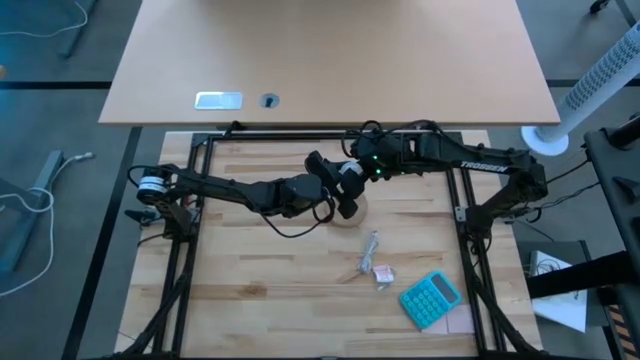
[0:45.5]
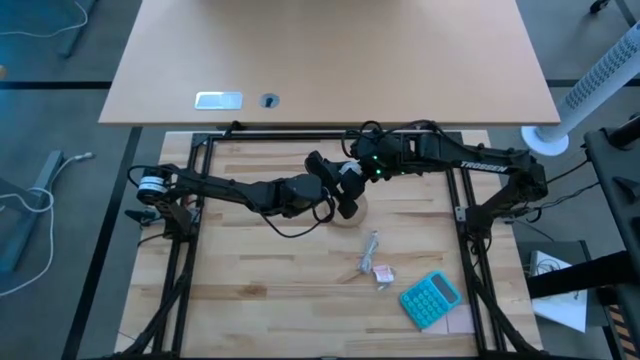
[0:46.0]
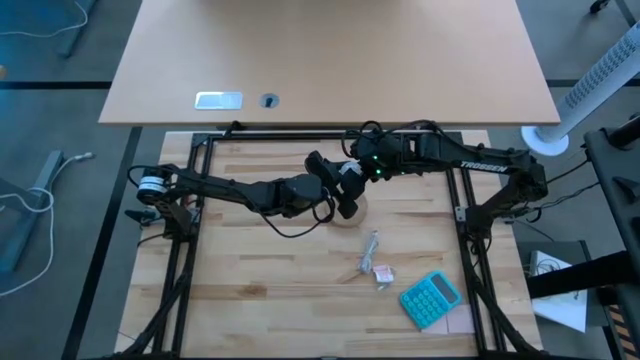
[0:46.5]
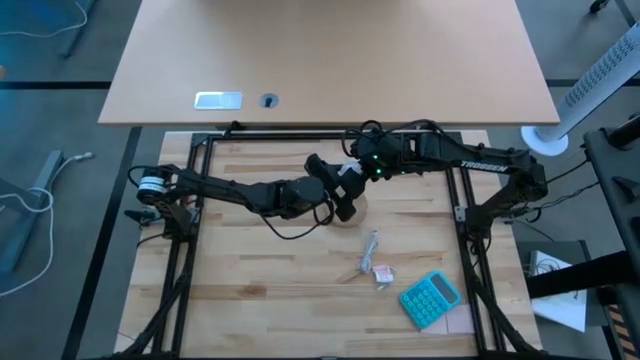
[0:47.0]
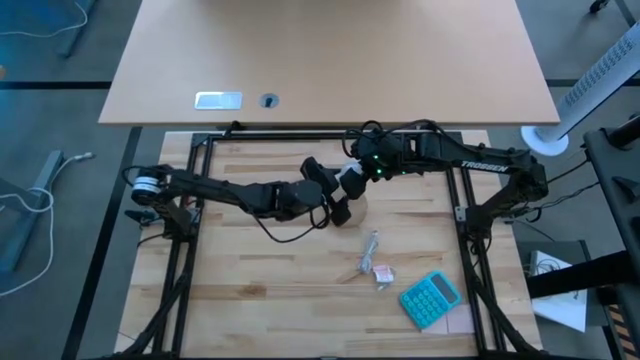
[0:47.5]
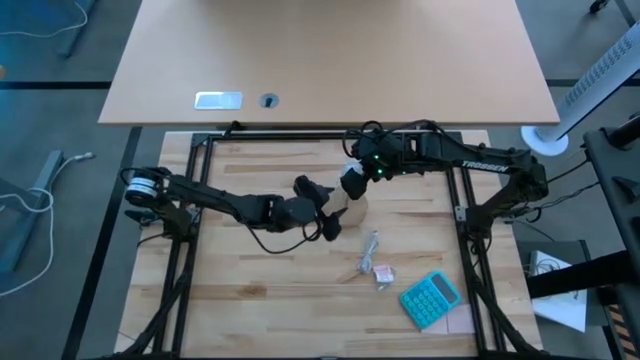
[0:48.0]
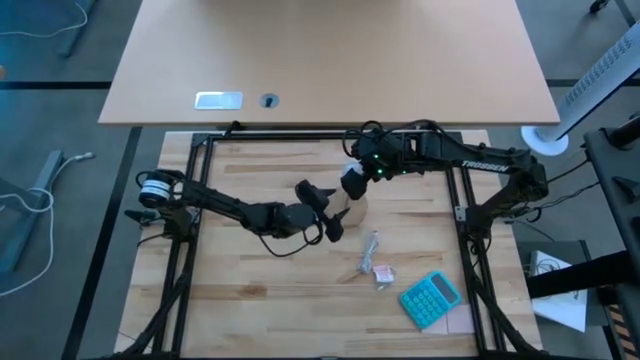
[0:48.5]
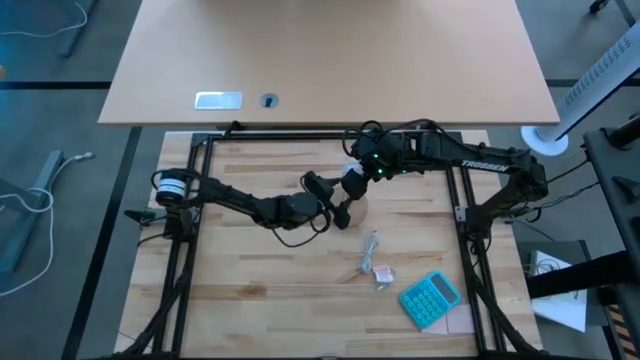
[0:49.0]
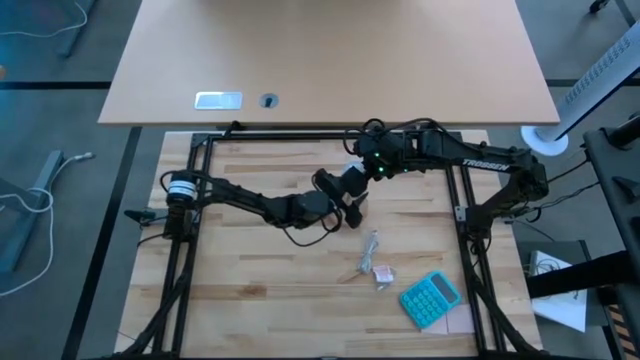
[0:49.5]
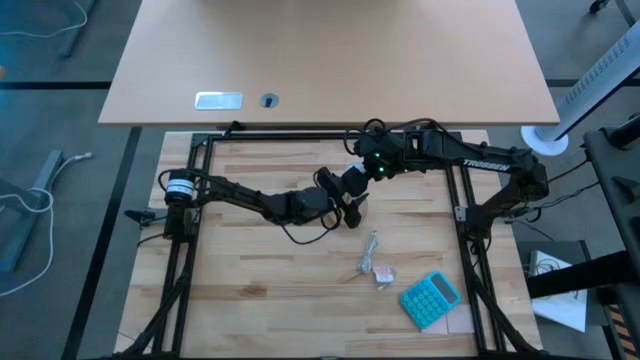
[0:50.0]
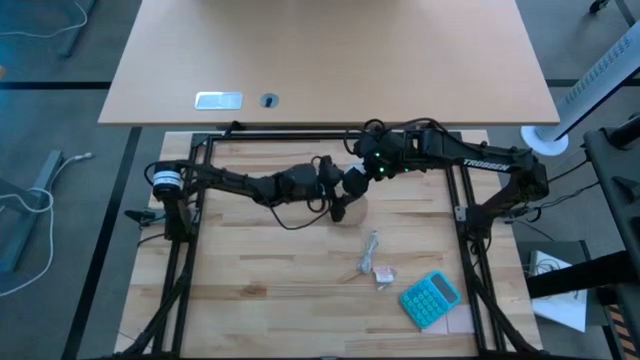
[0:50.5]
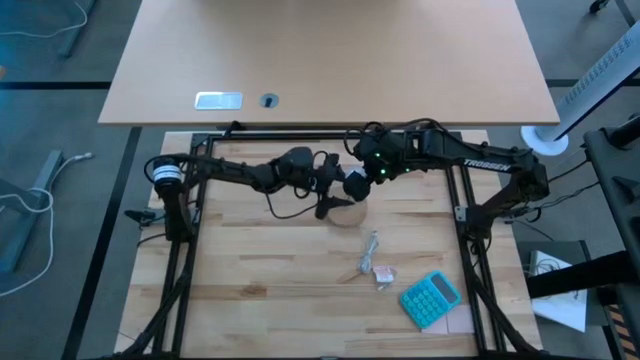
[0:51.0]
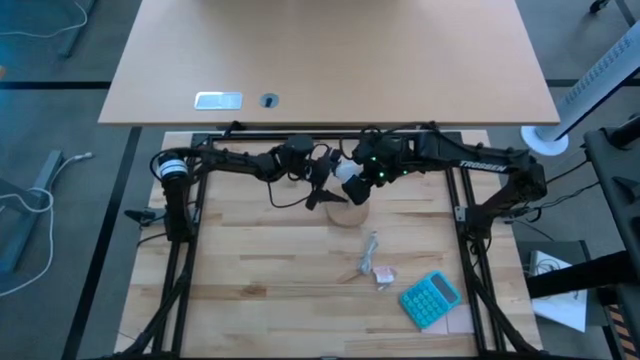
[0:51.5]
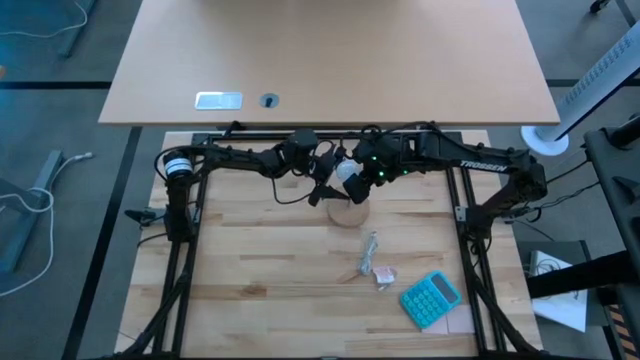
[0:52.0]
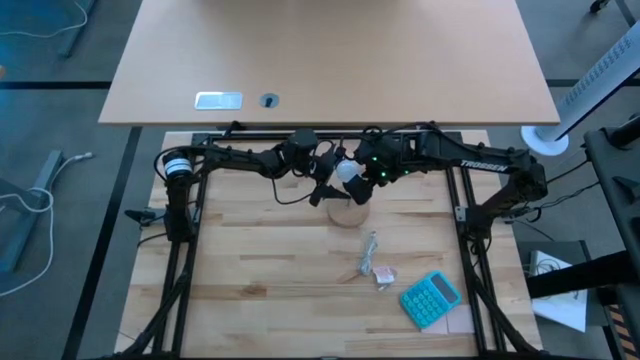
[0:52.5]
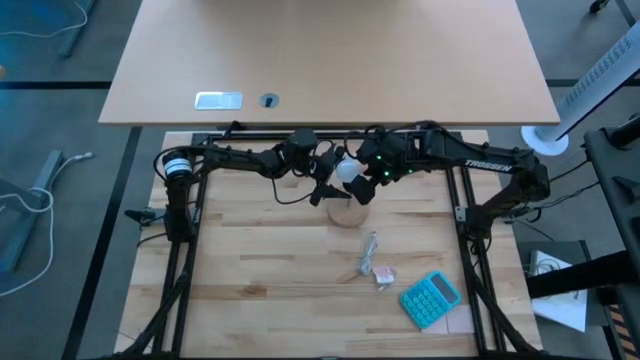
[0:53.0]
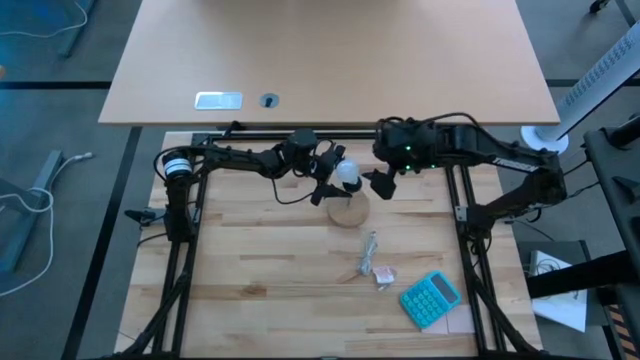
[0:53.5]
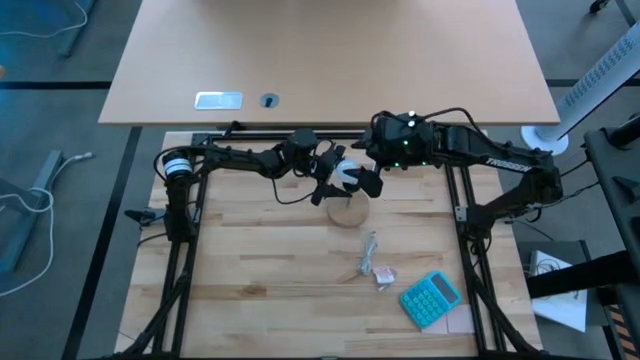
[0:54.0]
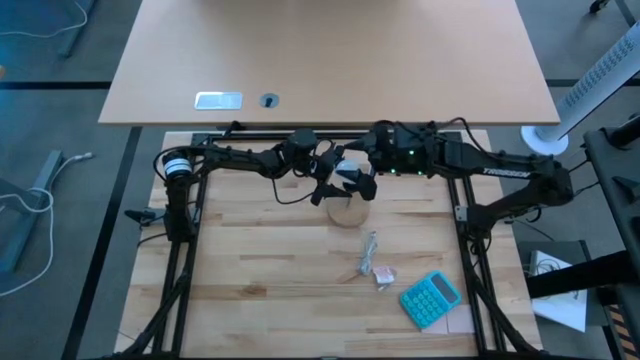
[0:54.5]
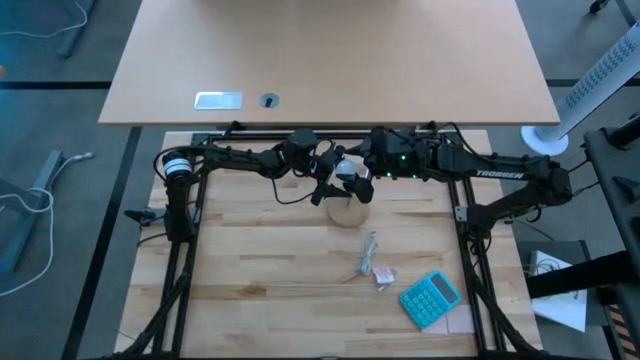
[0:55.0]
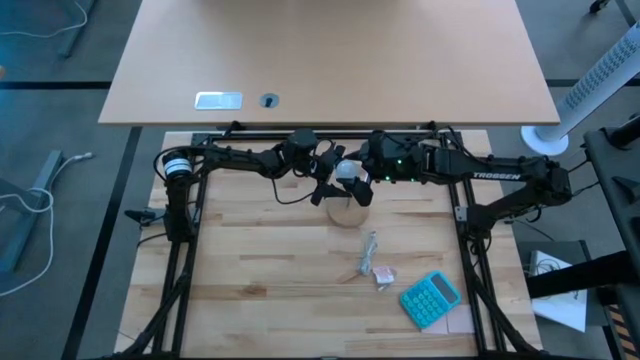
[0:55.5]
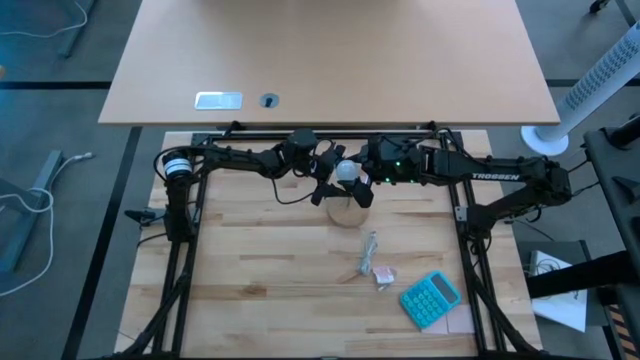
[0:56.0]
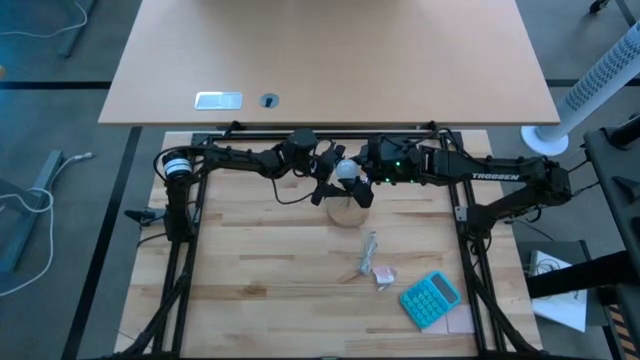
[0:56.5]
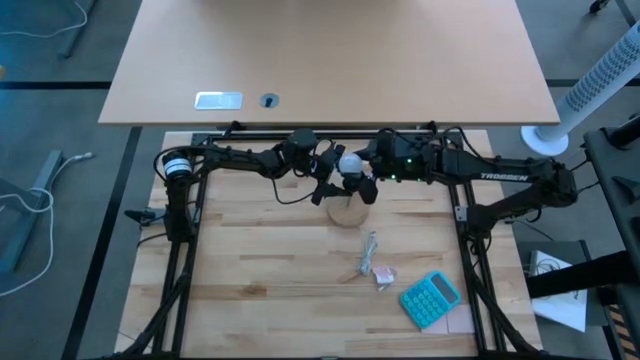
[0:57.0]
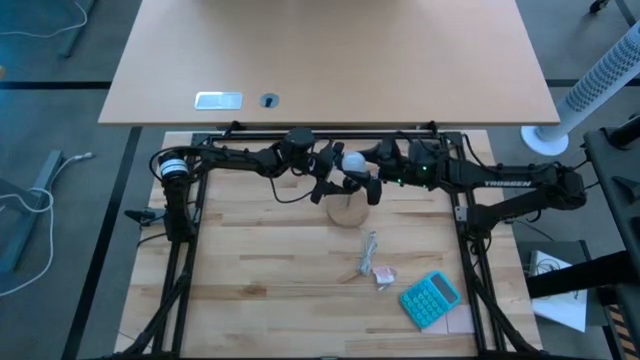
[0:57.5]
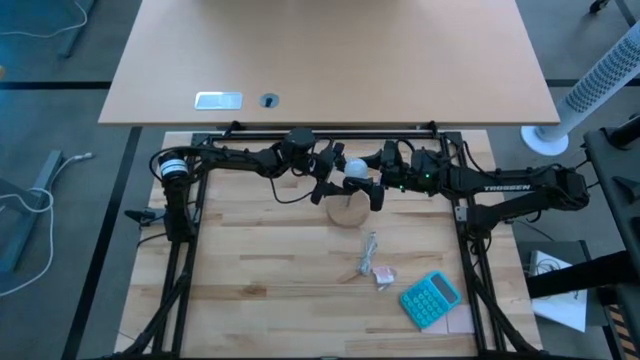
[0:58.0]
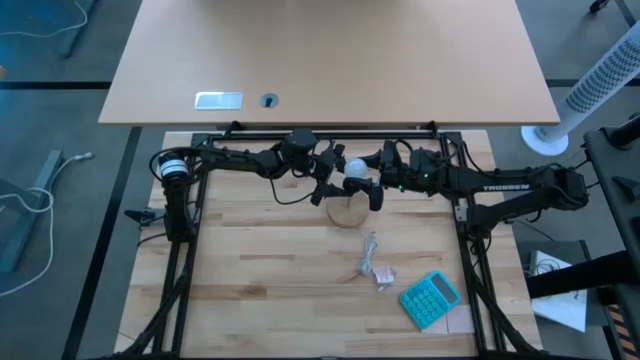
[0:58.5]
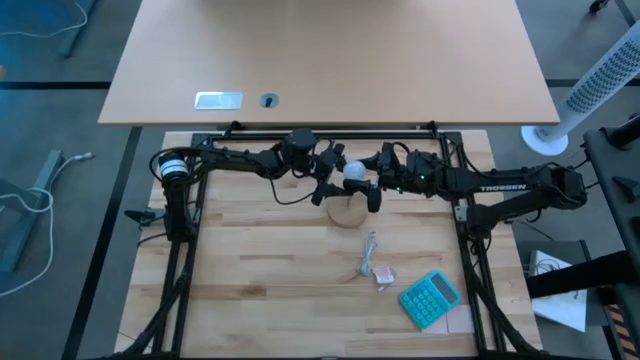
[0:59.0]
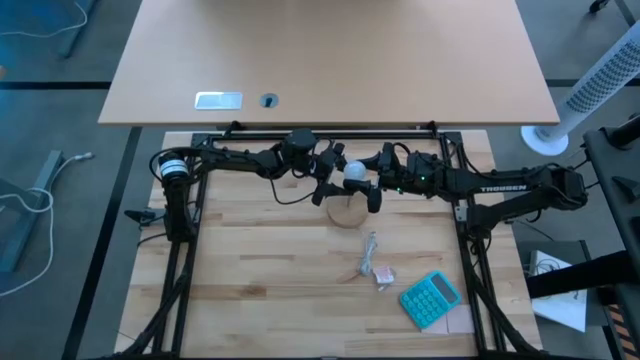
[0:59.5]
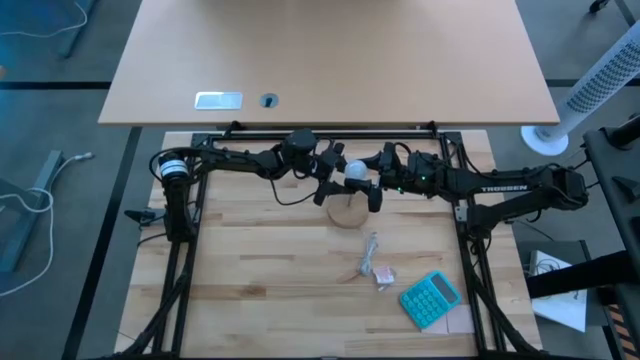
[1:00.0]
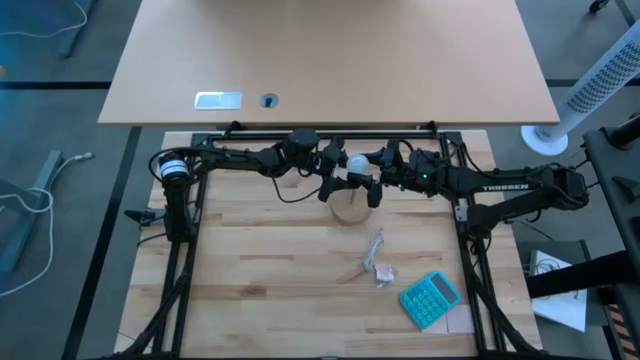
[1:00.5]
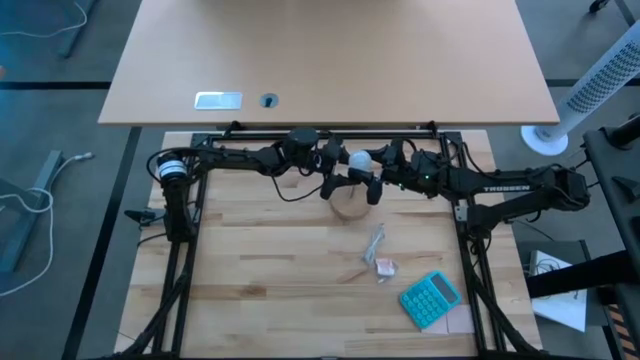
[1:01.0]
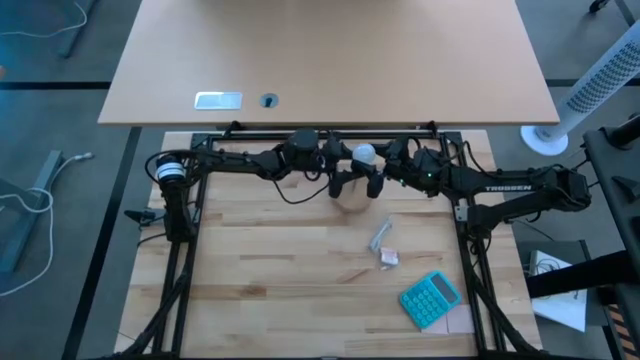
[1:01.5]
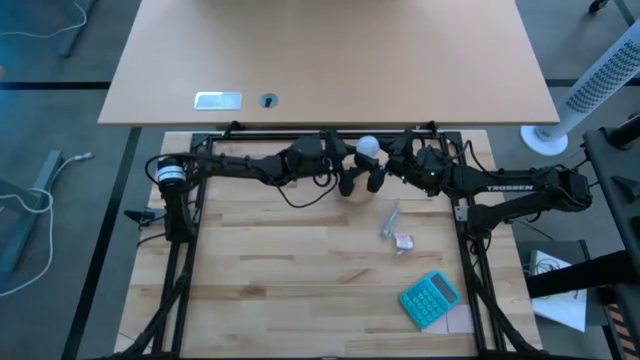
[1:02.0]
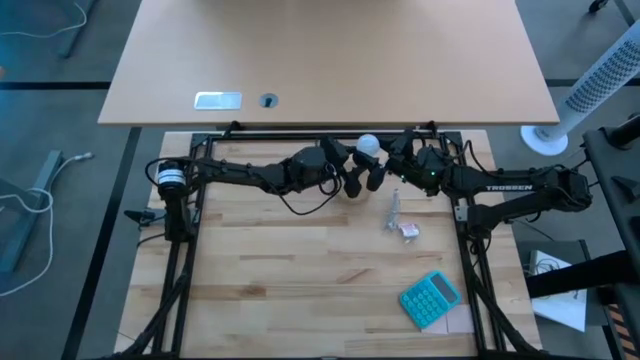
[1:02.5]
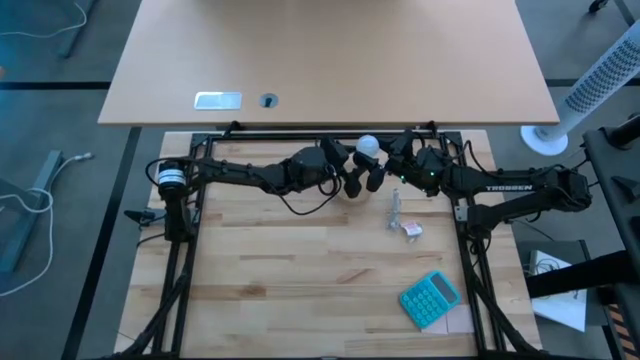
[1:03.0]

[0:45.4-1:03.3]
Task: Screw lightbulb
Insert the lightbulb into the lamp

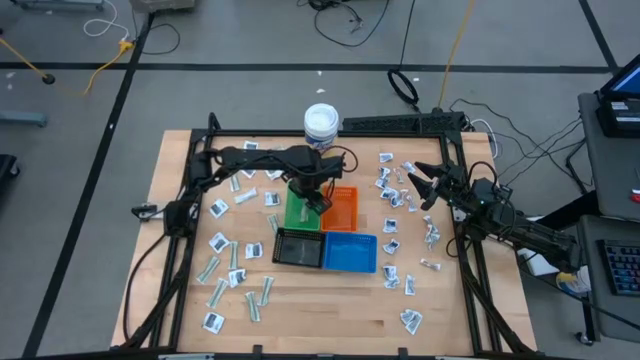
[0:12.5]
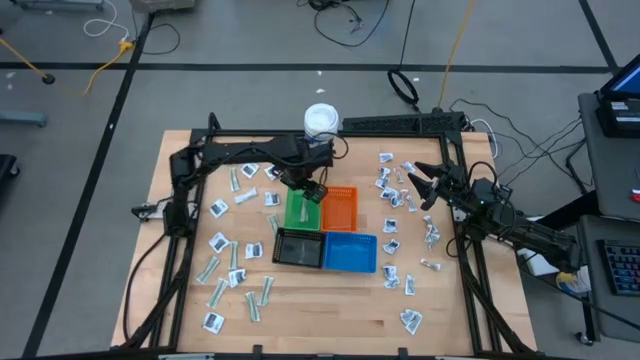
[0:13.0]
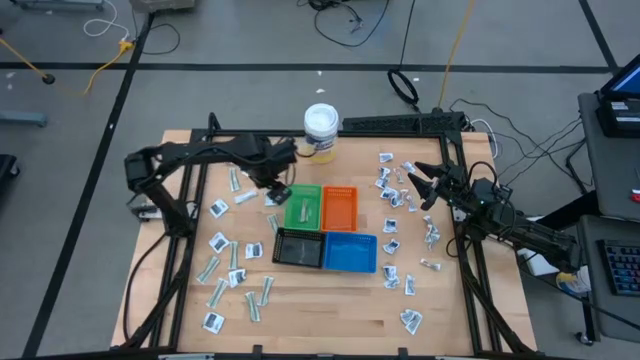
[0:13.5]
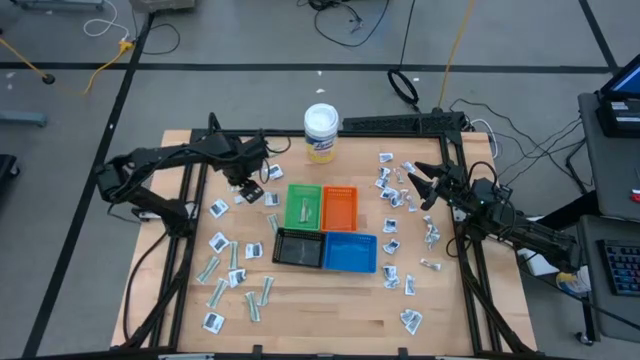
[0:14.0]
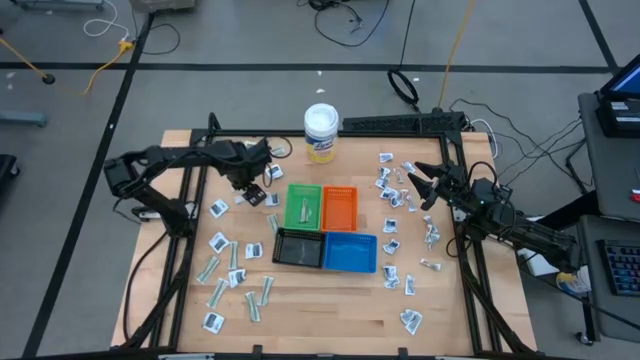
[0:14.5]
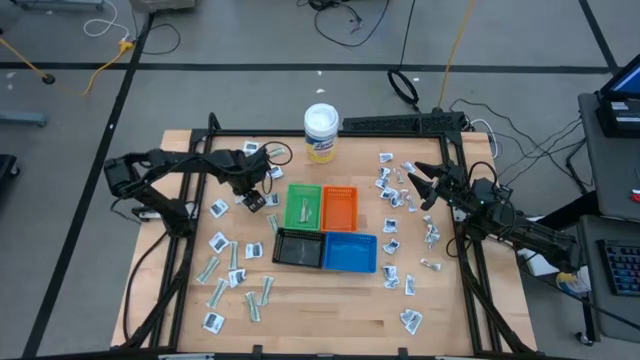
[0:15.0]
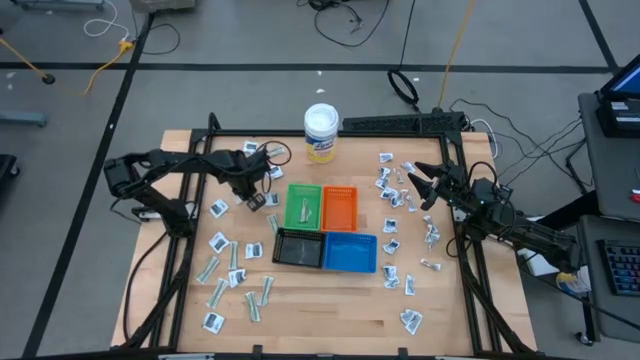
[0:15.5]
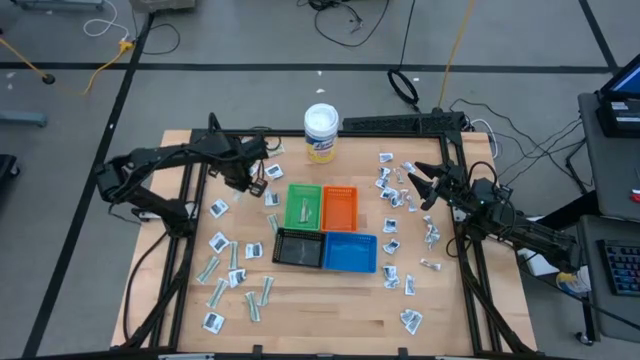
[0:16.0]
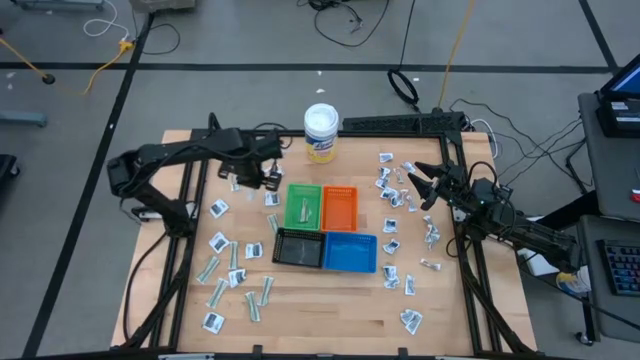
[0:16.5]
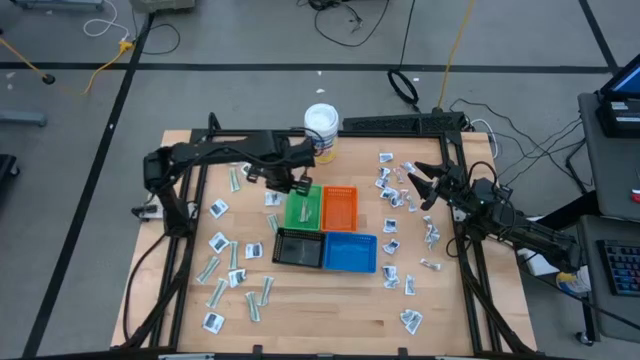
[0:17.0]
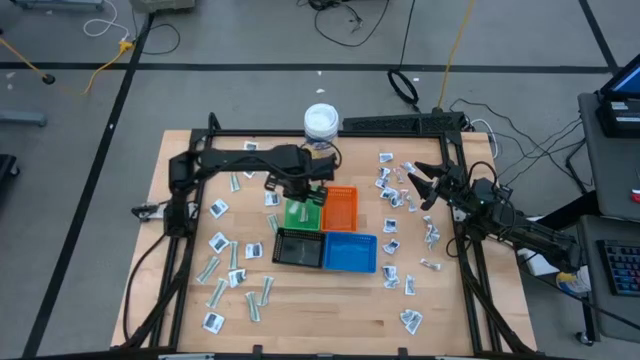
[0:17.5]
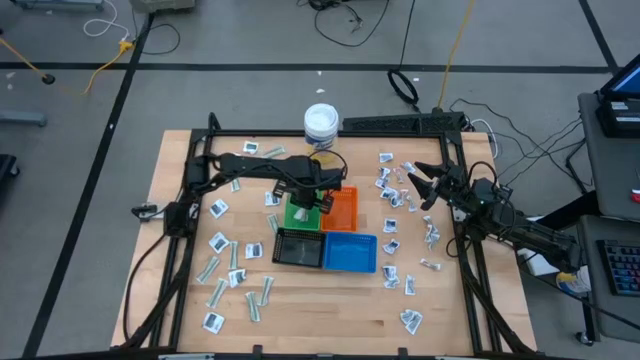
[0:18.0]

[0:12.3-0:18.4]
Task: Pick & Place First Aid Supplies
Put the bandage pack into the green bin
